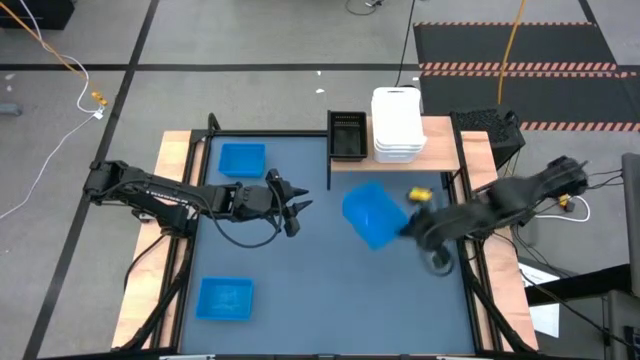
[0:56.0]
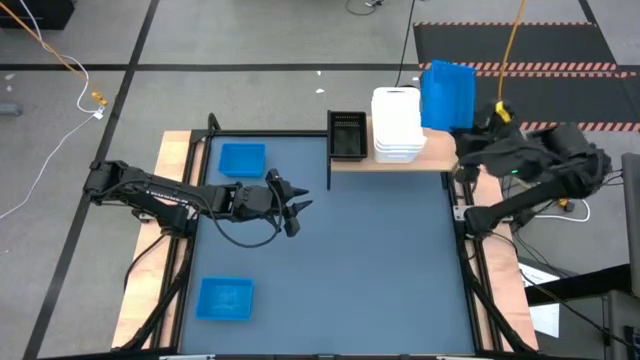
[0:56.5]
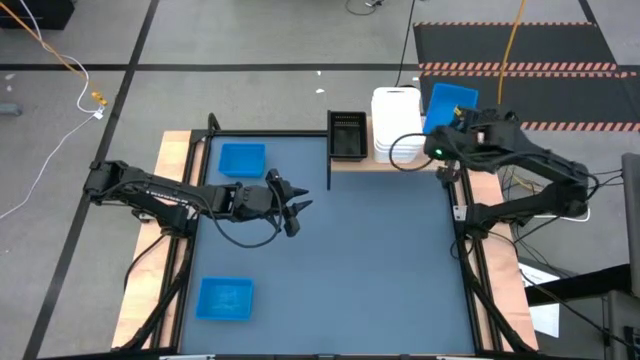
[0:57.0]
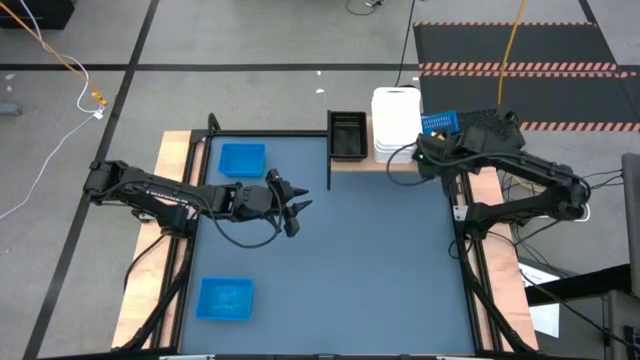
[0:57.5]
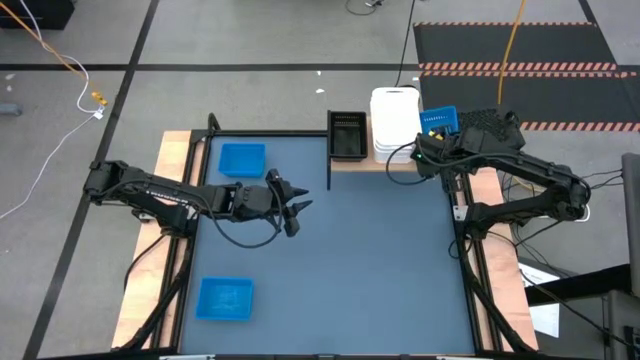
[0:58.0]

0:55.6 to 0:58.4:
Task: Stack baskets on shelf by color
Put the middle right blue bin into the shelf

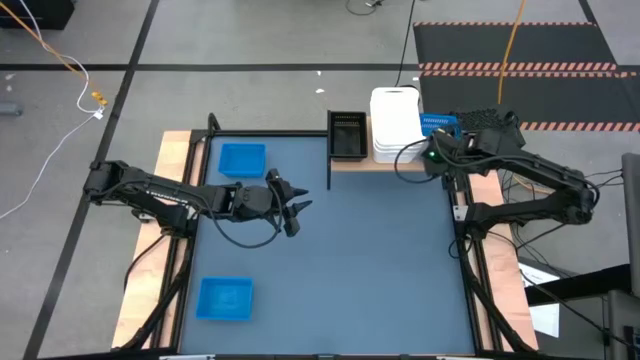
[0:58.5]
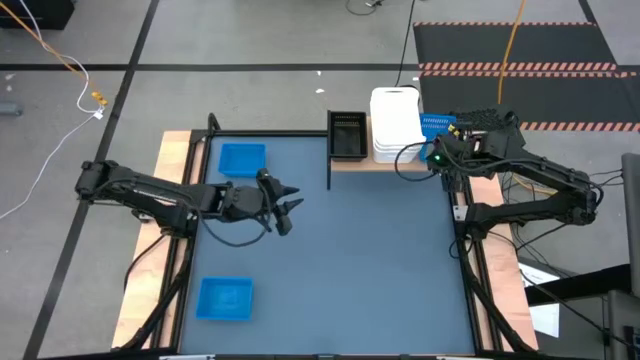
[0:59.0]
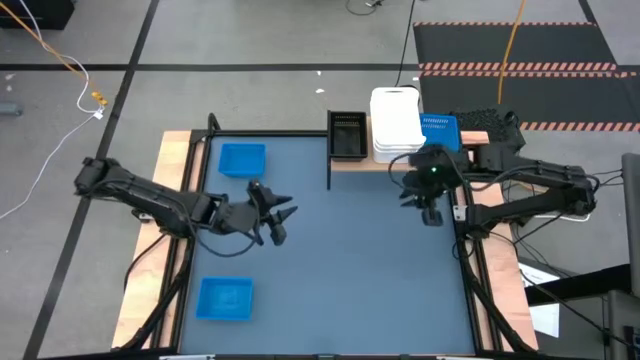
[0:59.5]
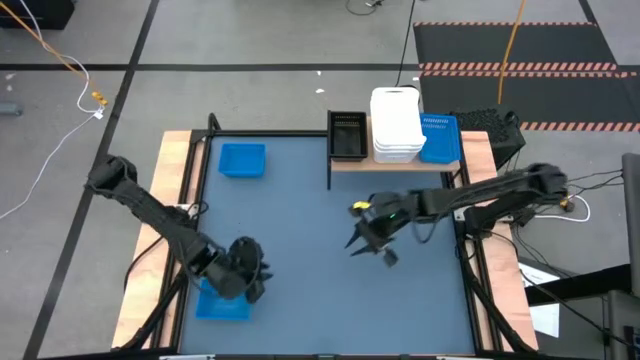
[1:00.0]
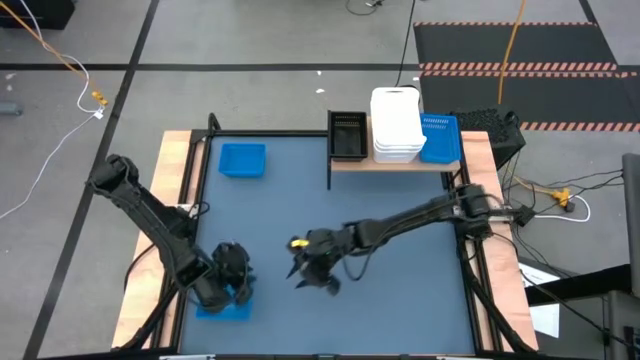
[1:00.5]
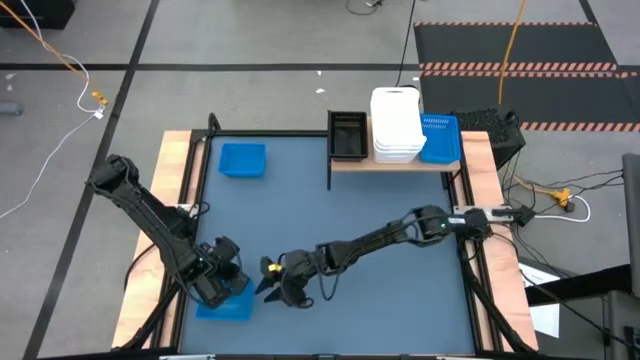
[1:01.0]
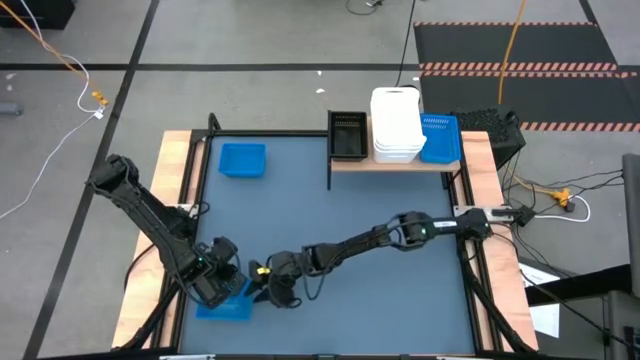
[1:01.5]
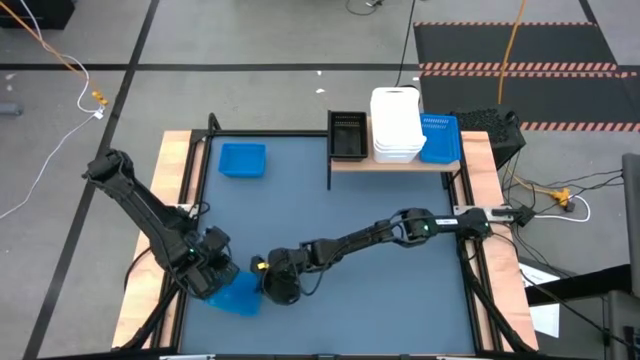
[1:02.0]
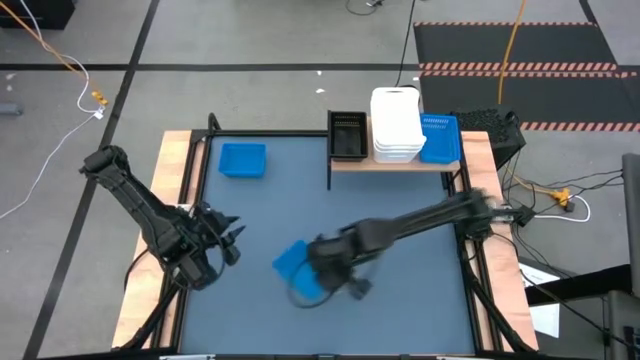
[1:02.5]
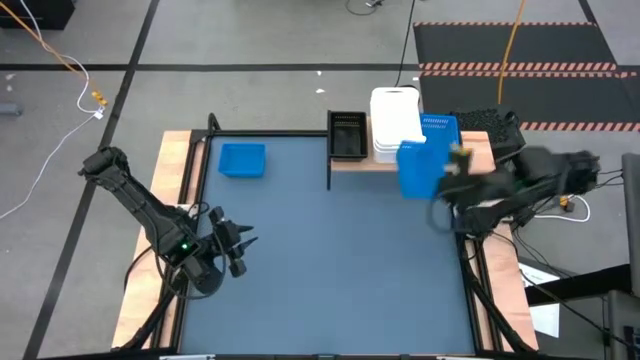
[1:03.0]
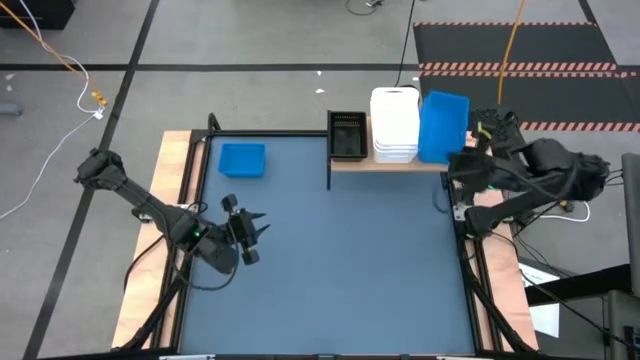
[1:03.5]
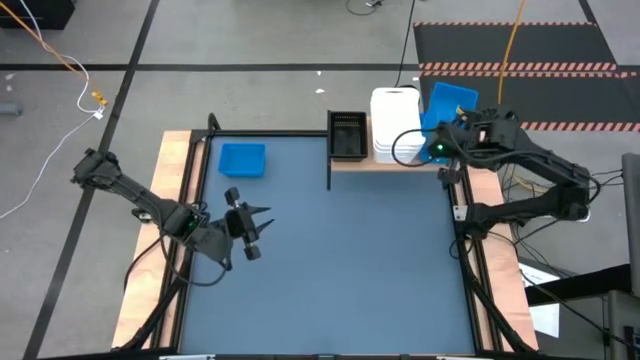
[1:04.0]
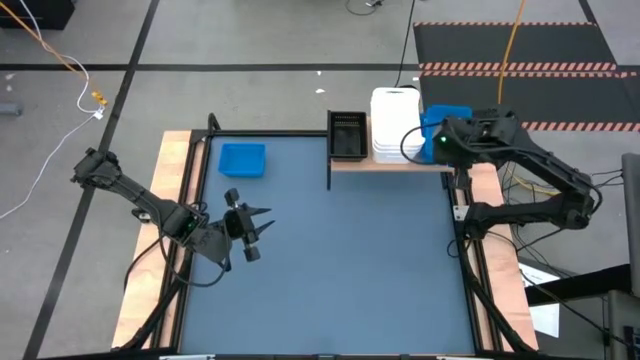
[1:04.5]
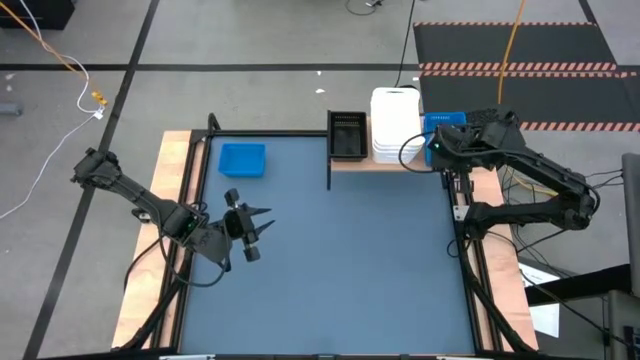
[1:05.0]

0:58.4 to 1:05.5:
Stack the bottom blue bin on top of the blue bin on the shelf

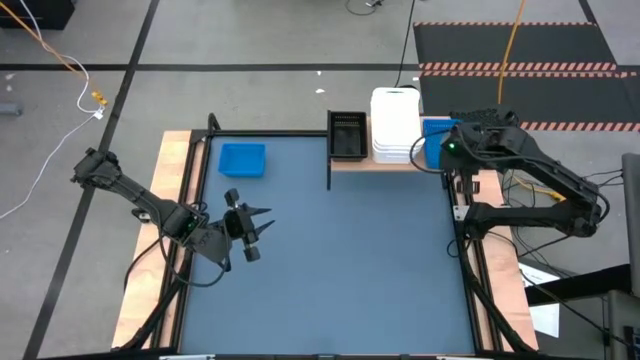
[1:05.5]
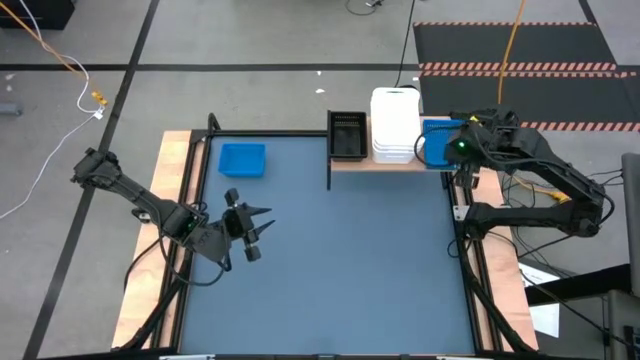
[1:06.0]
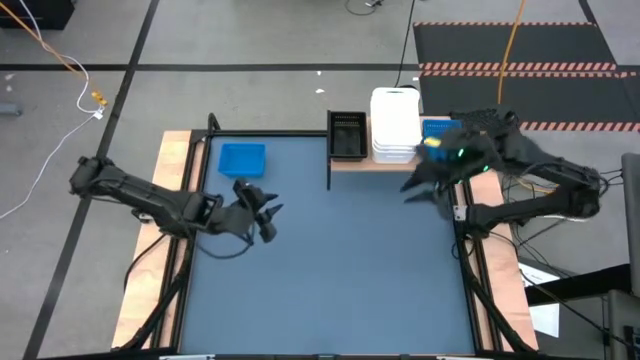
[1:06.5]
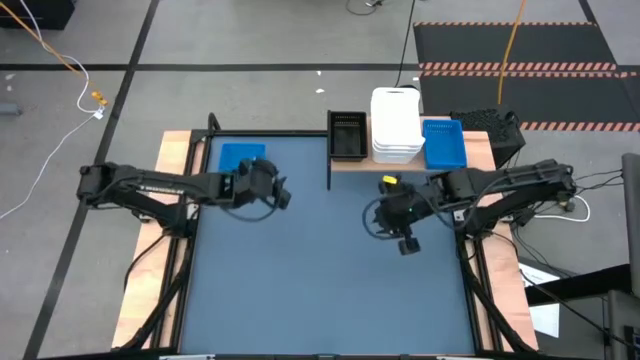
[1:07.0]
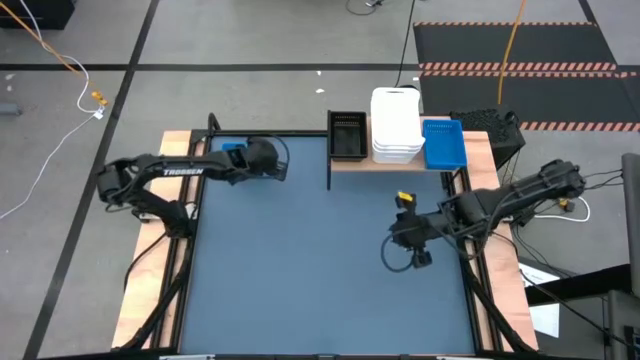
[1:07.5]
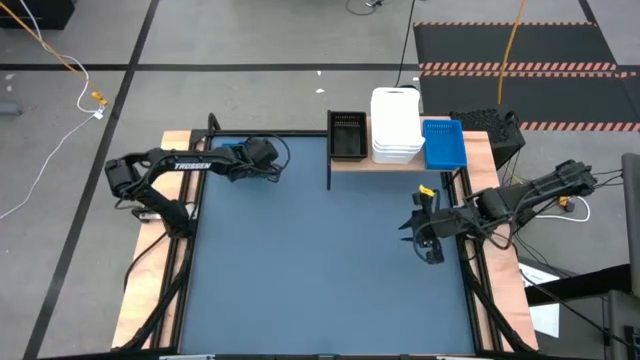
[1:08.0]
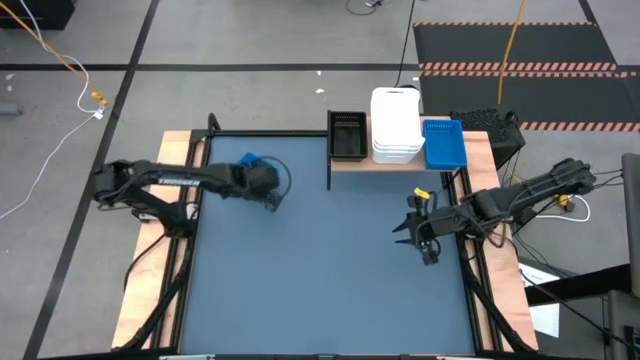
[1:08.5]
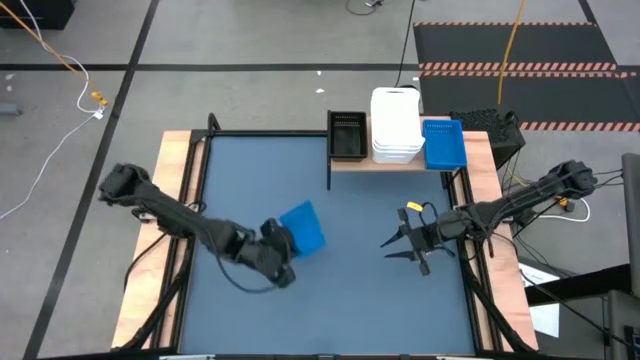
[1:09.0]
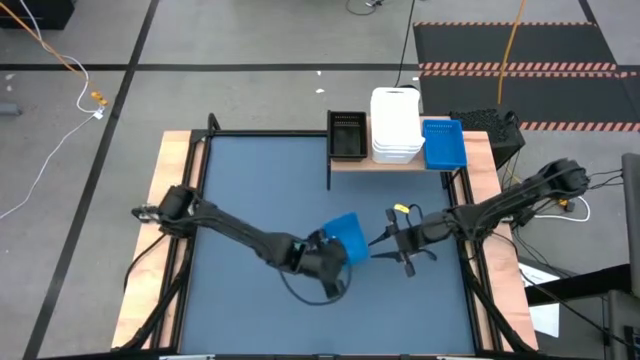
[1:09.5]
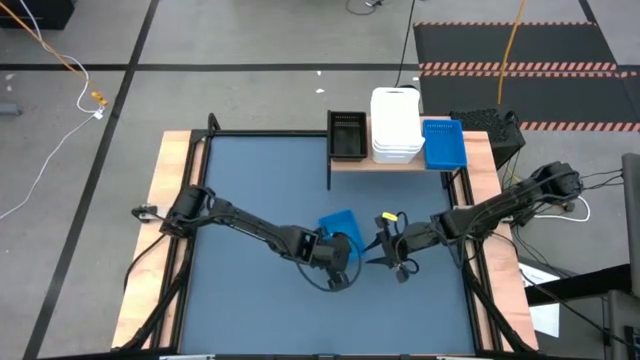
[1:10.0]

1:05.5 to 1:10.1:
Move the blue bin to the center of the table

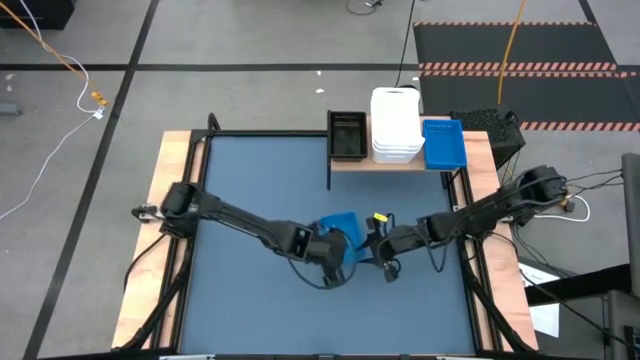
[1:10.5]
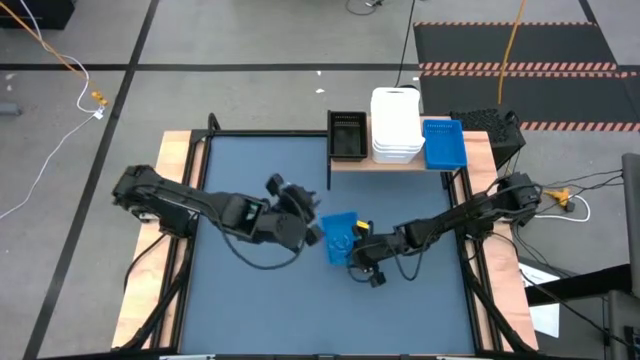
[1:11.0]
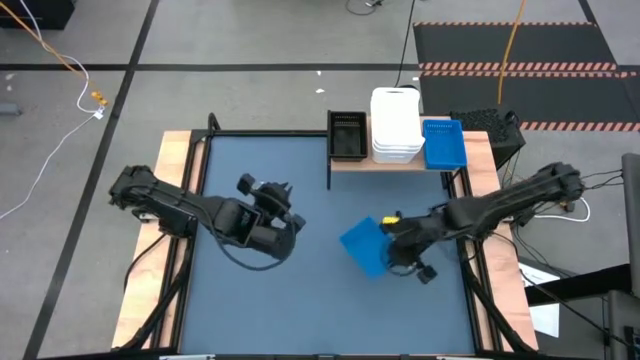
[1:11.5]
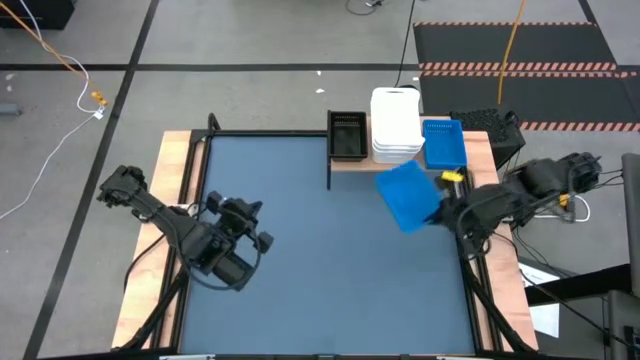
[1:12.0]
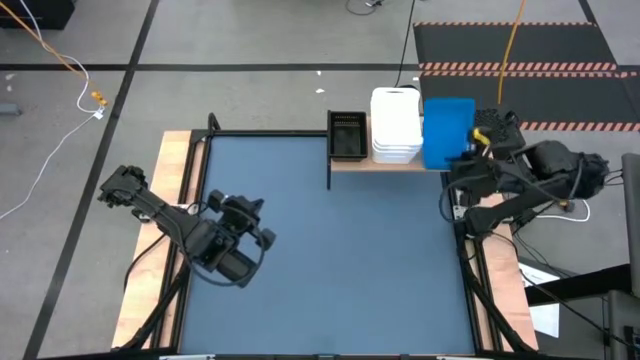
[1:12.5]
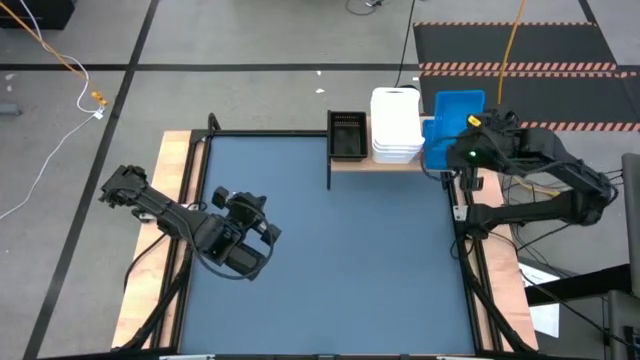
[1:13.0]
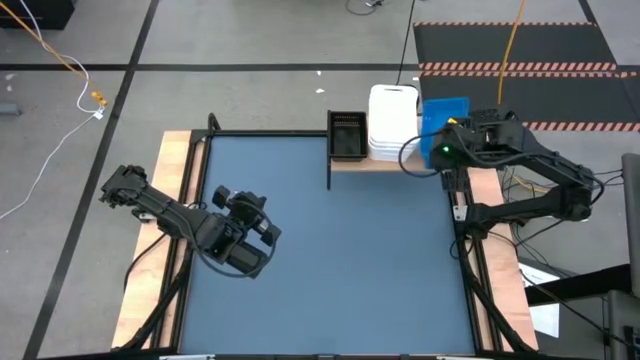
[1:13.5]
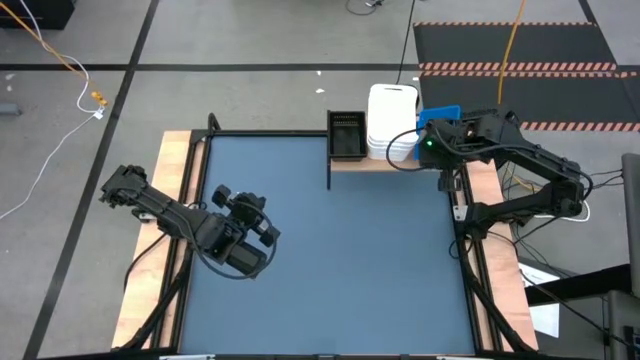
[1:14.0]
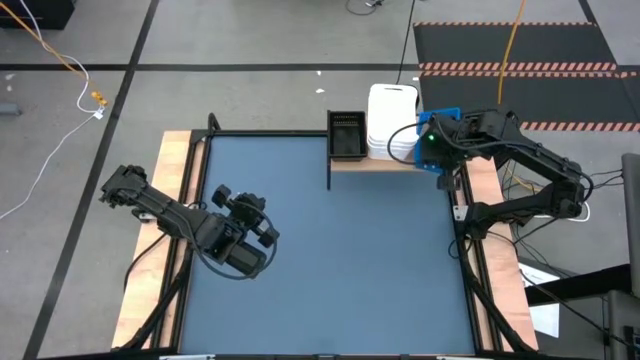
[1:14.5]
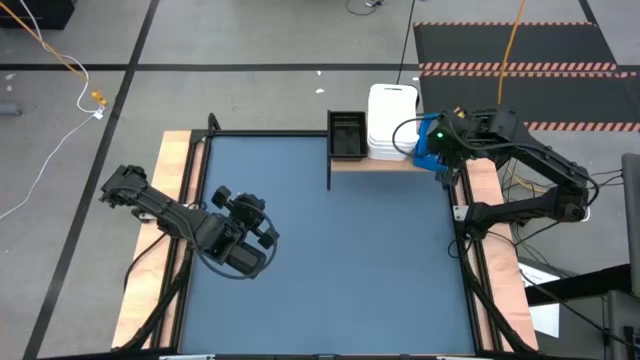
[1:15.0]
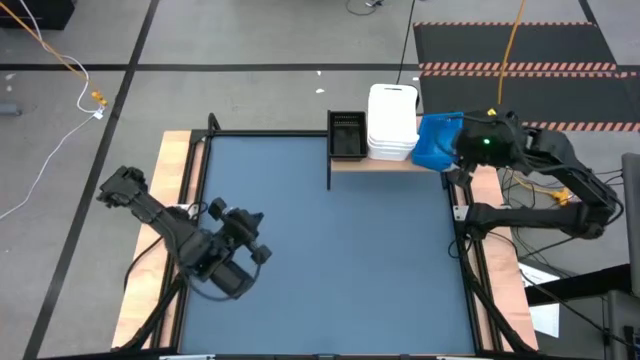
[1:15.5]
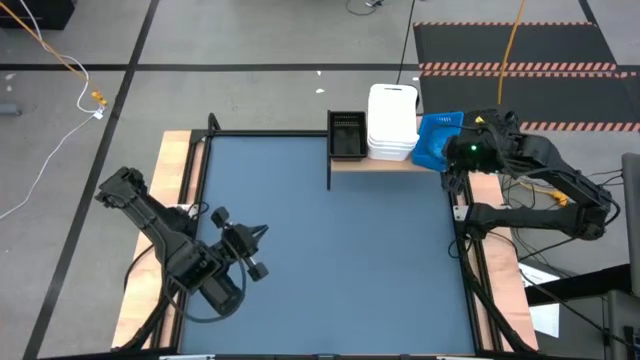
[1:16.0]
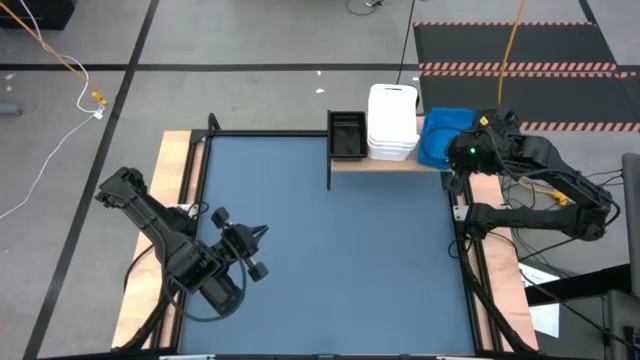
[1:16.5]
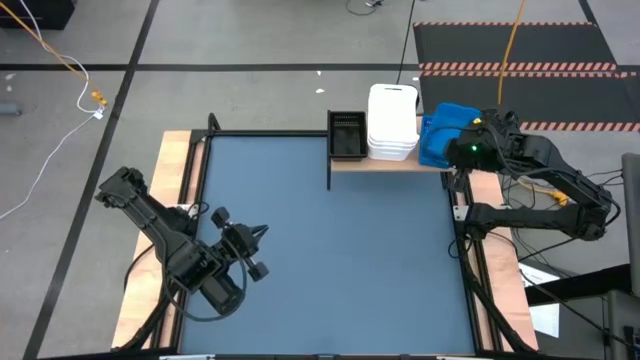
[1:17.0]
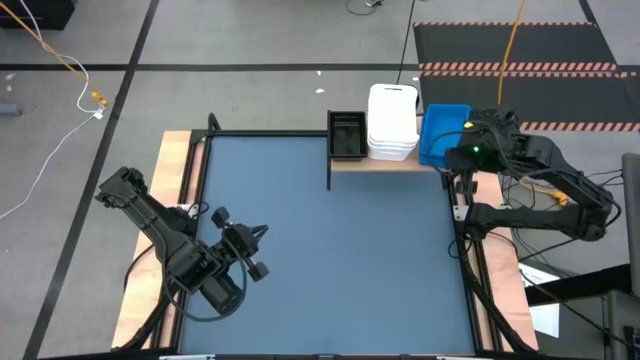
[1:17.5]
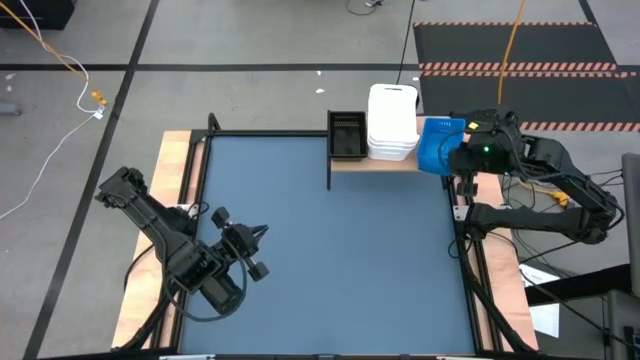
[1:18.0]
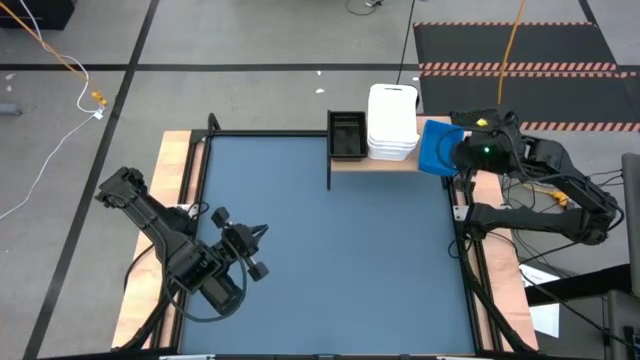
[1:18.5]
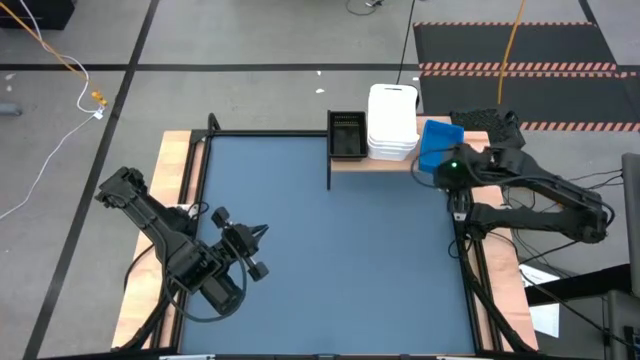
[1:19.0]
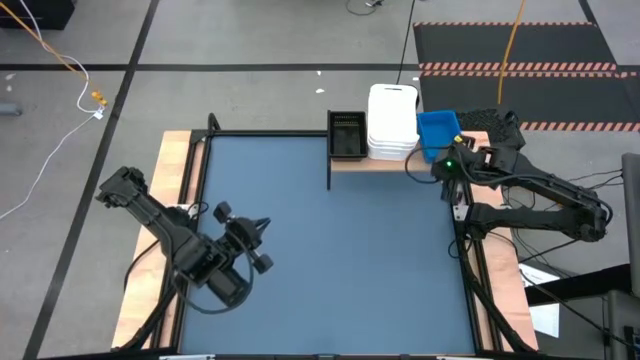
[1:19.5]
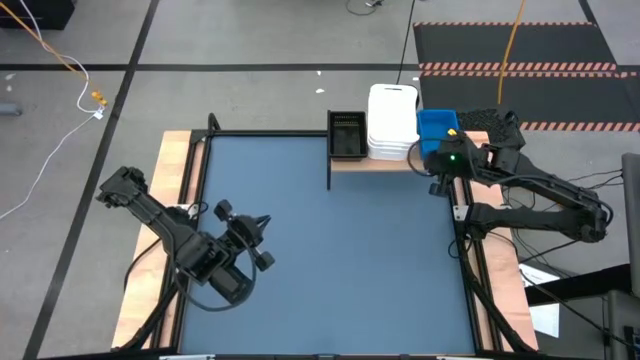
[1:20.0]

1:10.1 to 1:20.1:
Stack the blue bin on top of the stacked blue bin into the shelf
